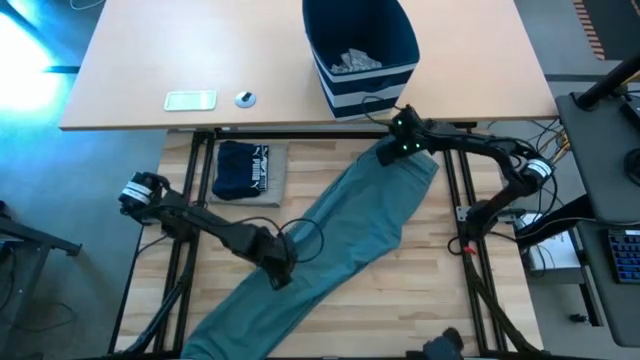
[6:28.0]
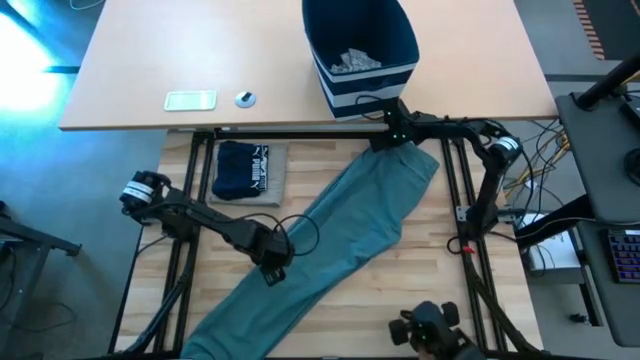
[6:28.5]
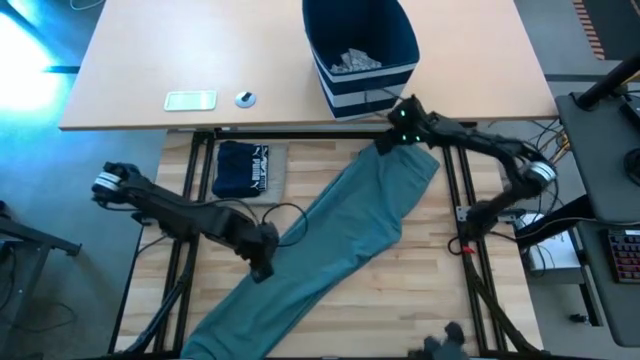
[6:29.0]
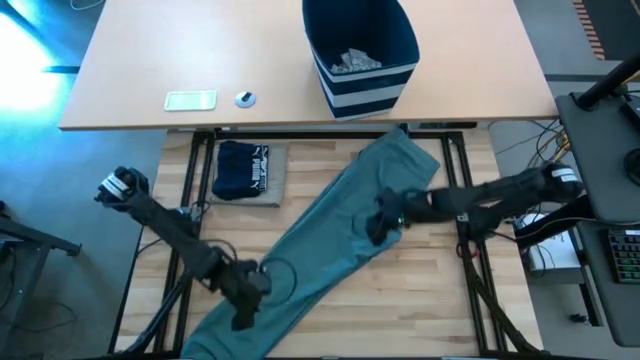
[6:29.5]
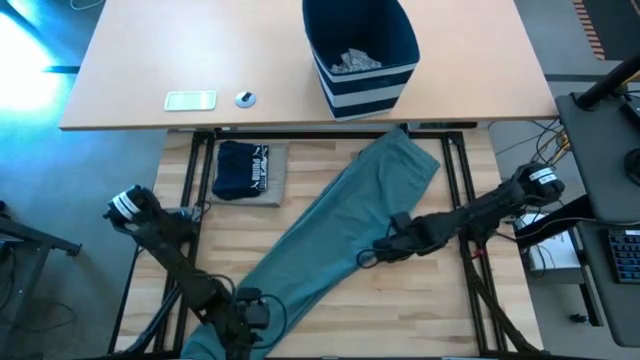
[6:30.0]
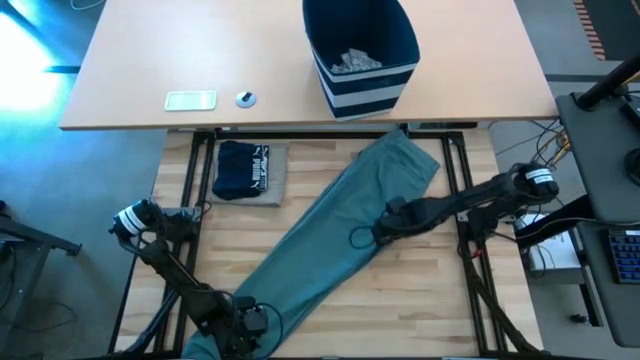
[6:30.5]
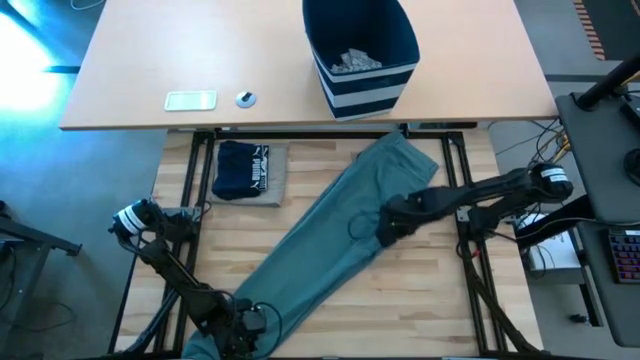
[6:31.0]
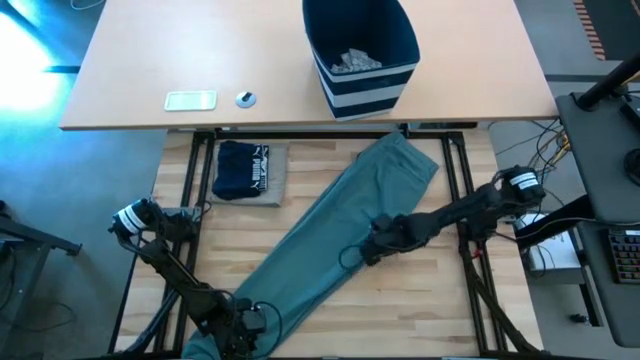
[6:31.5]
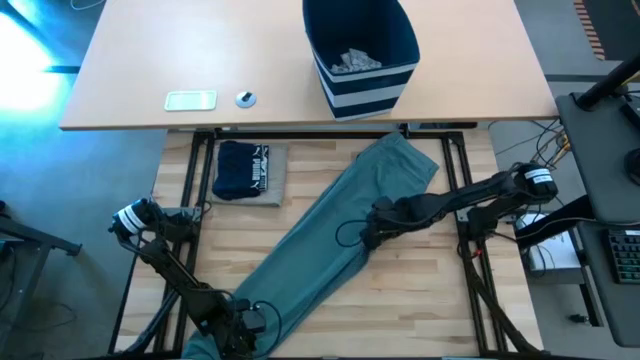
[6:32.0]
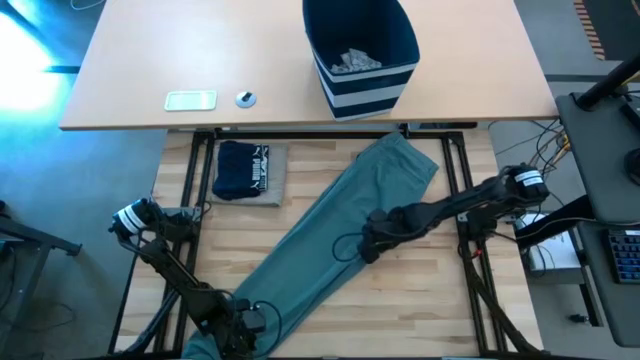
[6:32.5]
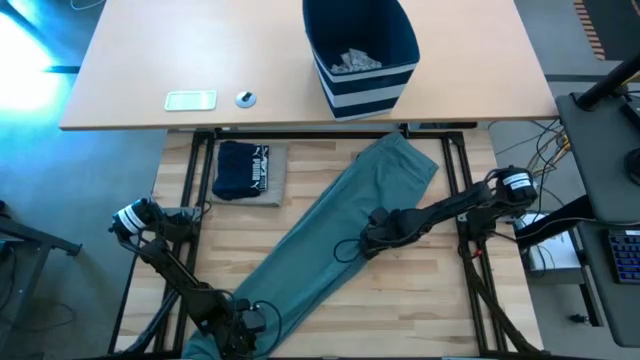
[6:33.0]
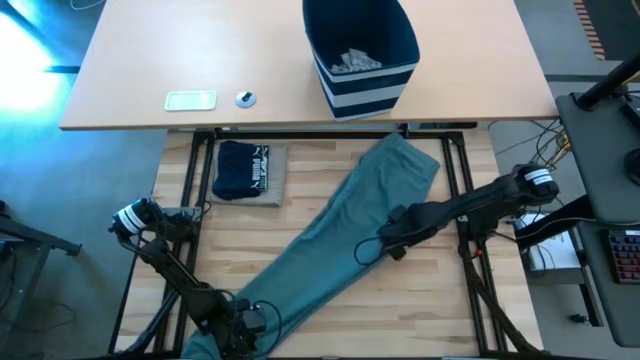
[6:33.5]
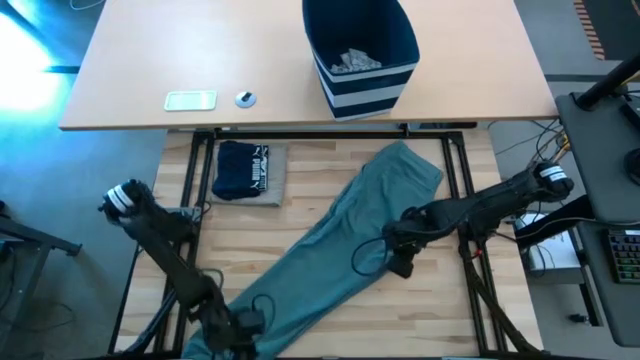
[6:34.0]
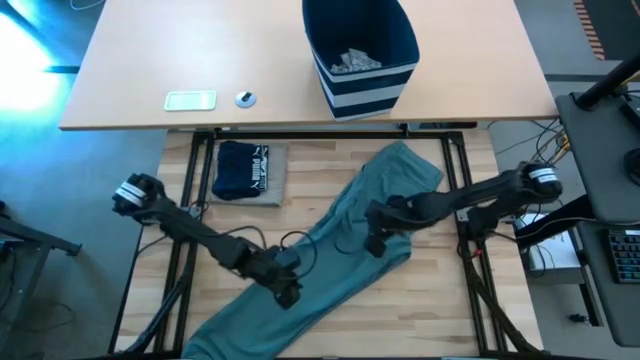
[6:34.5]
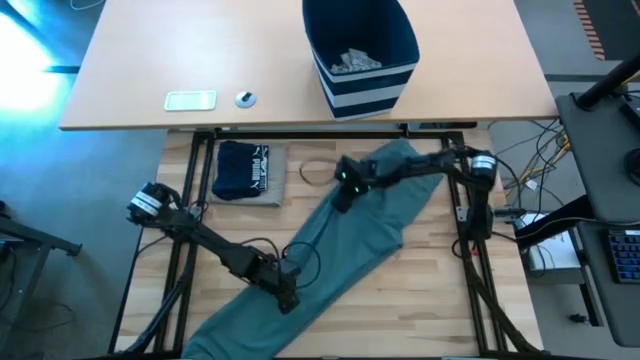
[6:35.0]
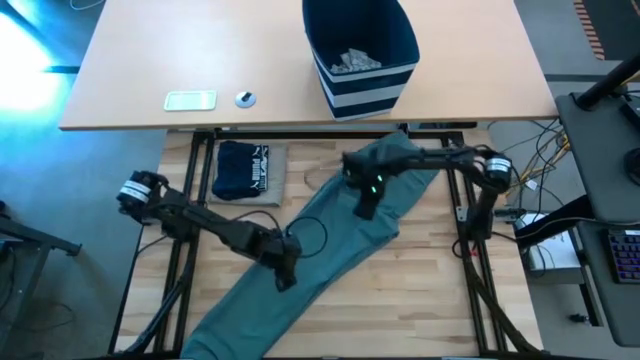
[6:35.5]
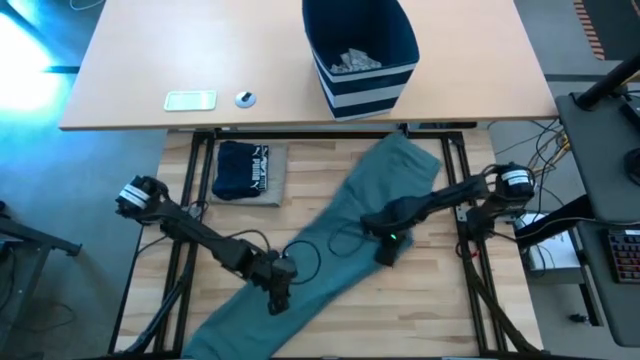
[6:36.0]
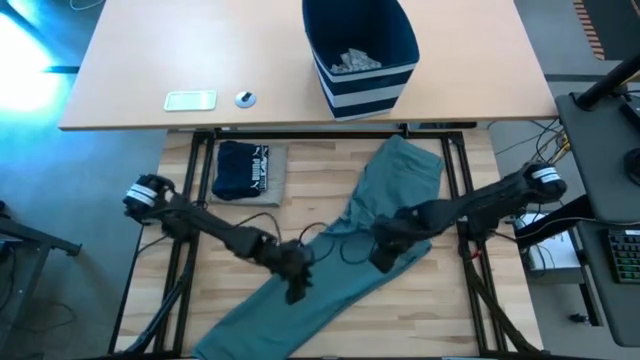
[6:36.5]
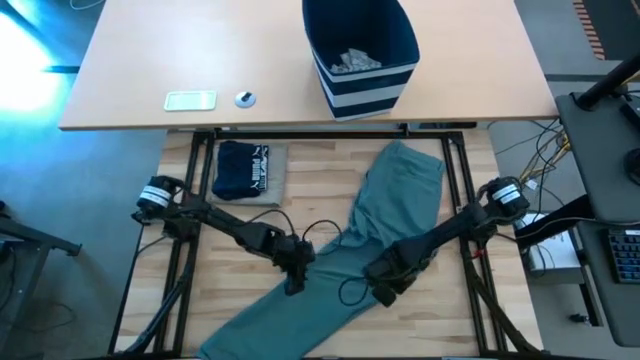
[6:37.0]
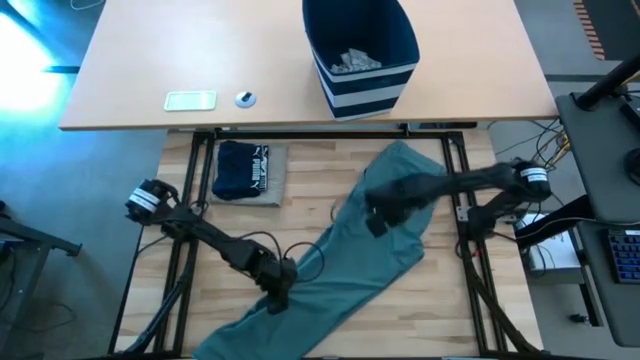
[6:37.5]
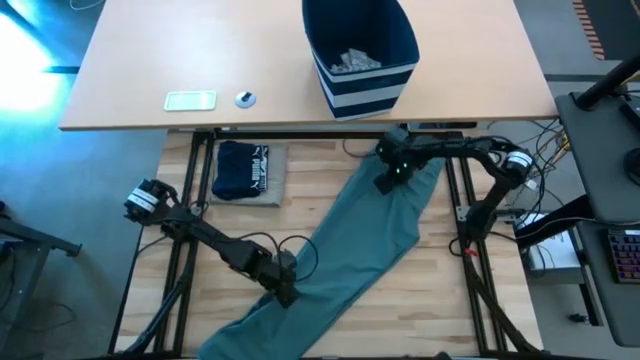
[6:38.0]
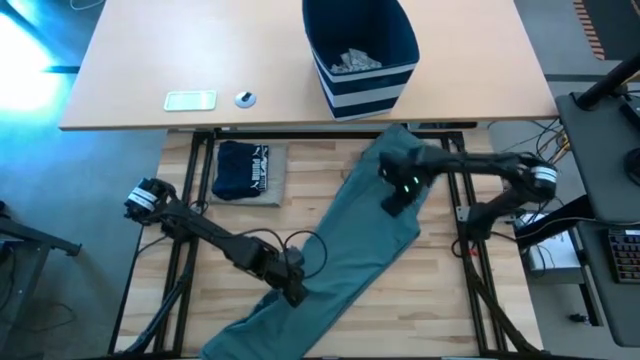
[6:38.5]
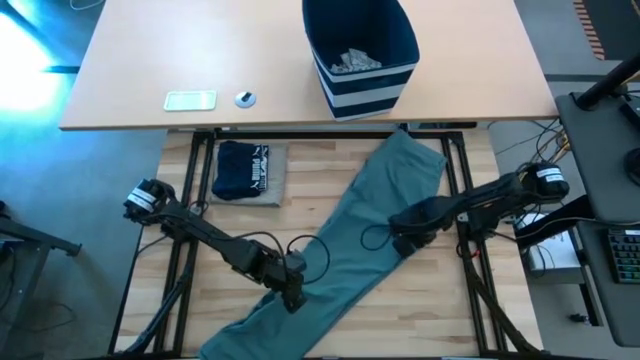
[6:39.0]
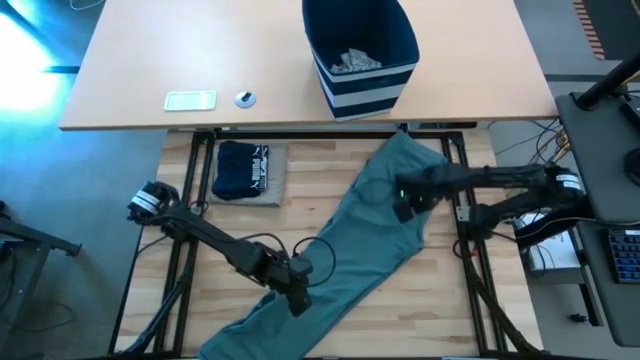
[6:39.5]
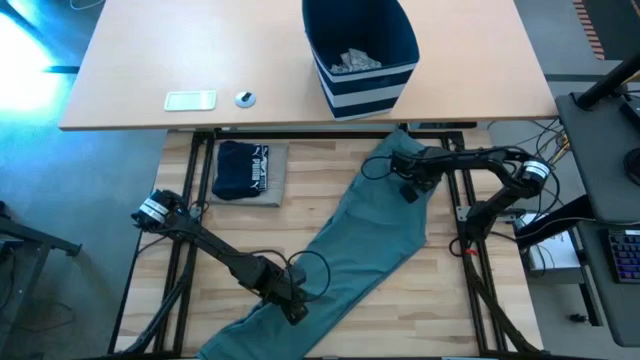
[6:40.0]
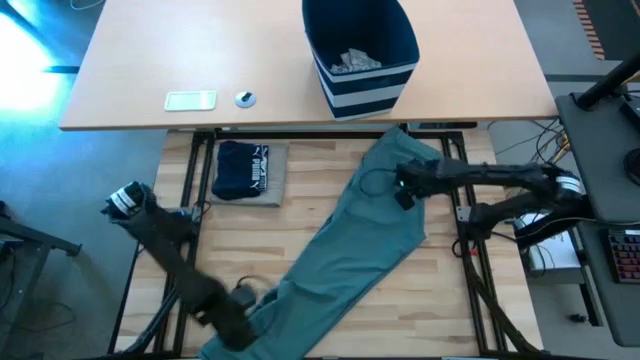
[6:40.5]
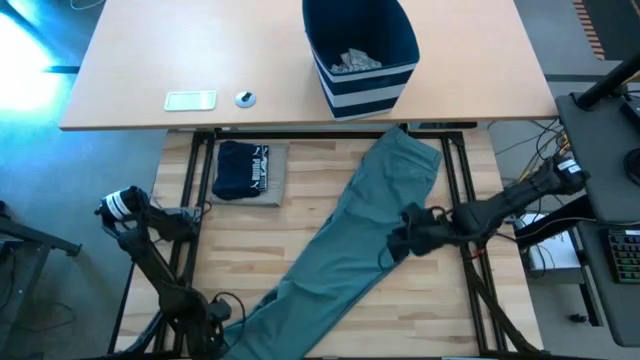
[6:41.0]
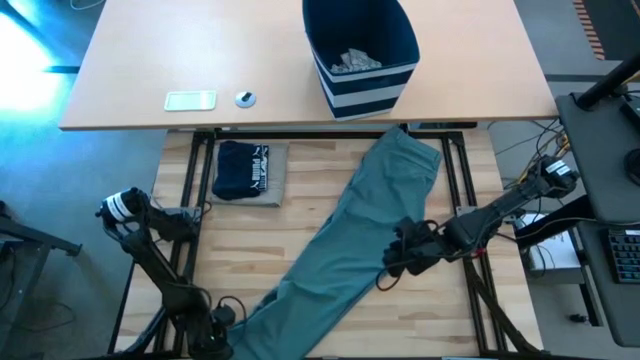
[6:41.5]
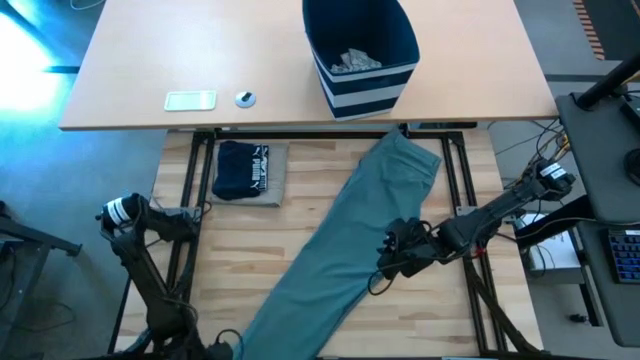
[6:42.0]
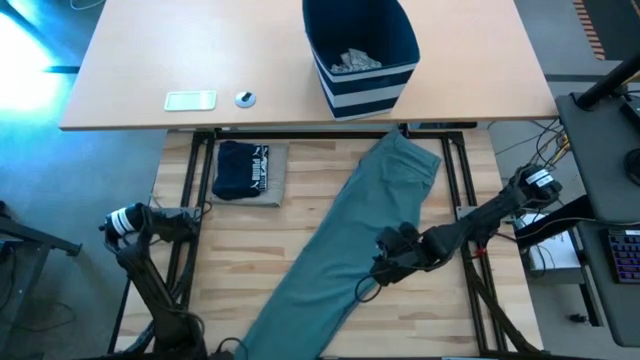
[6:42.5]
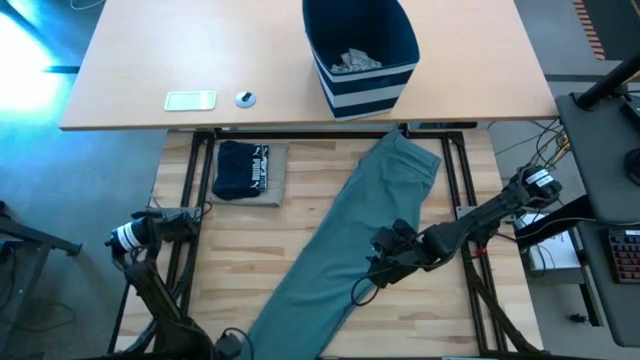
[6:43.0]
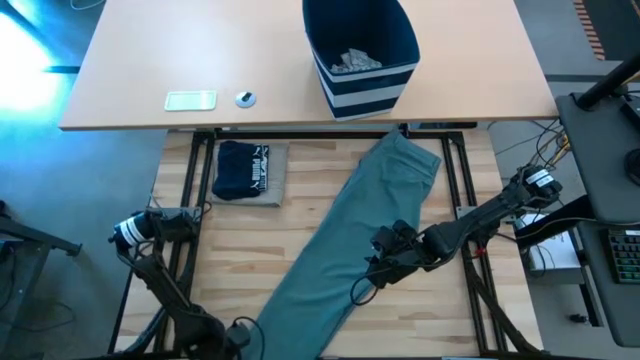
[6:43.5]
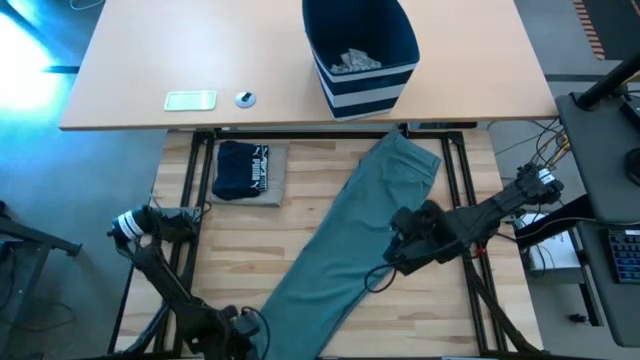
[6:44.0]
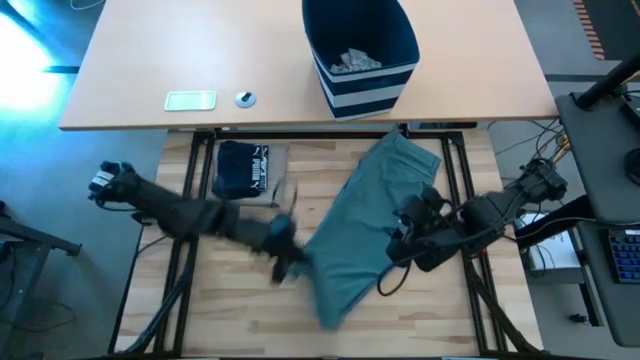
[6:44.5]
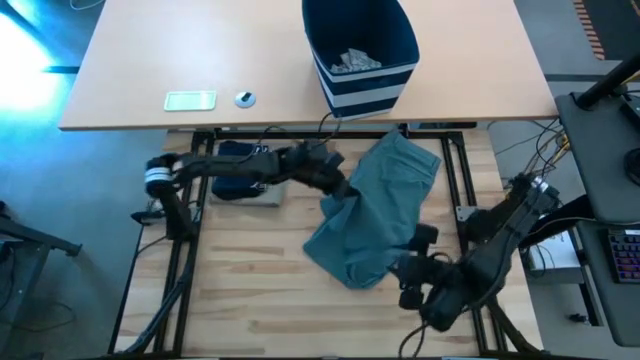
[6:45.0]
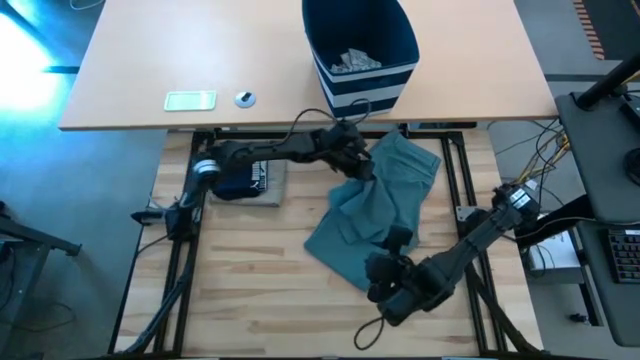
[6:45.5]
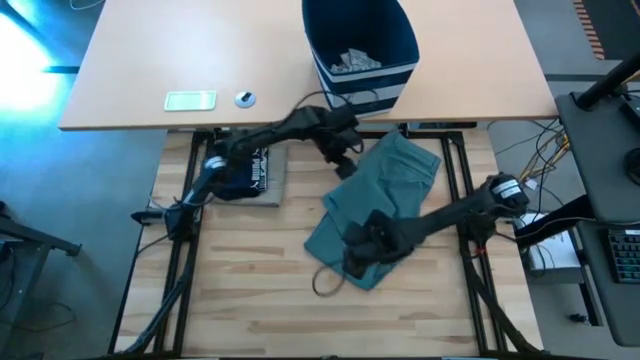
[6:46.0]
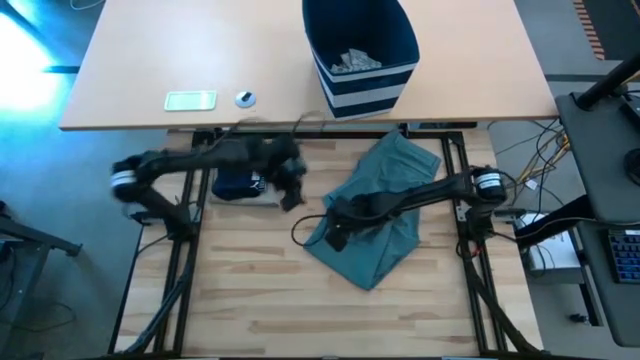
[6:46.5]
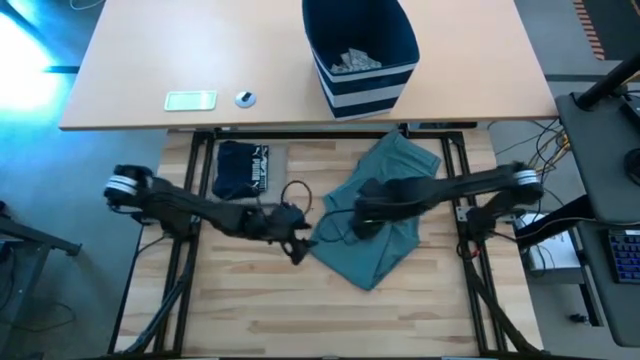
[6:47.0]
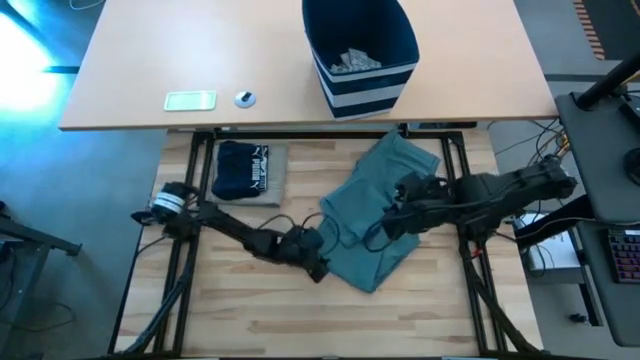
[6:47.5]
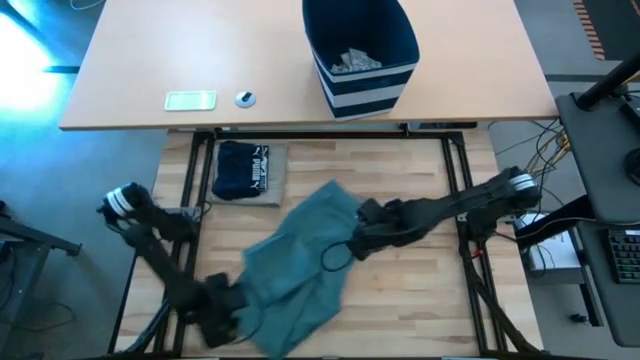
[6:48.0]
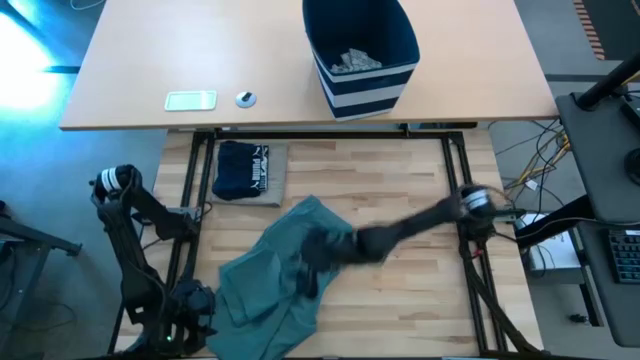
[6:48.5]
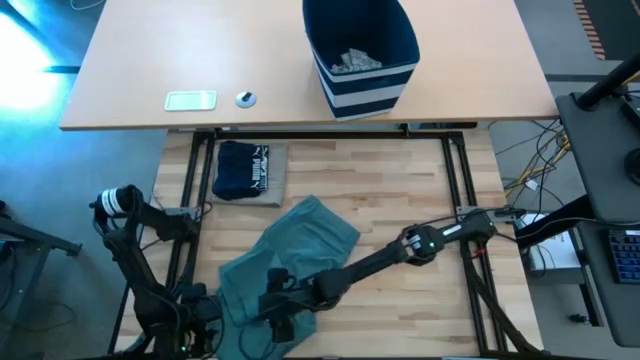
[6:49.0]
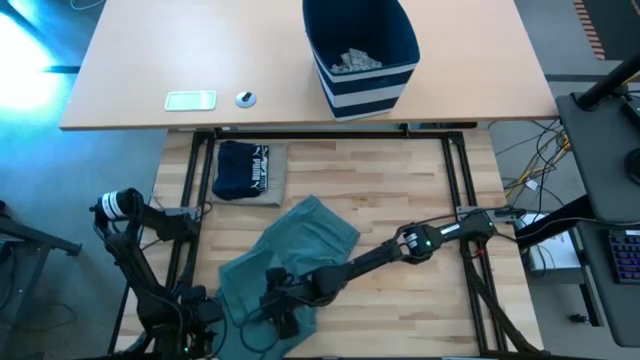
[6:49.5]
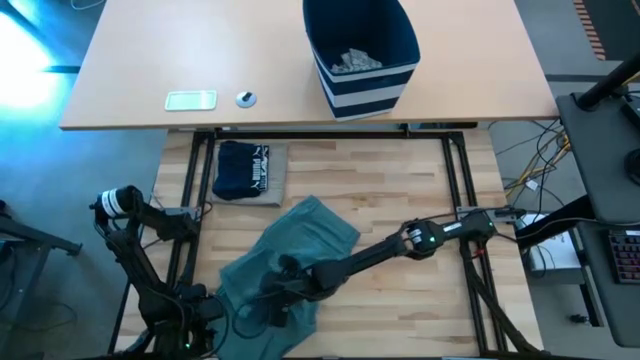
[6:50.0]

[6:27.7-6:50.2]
Task: Fold Laundry from Bin
Fold the gray pants
